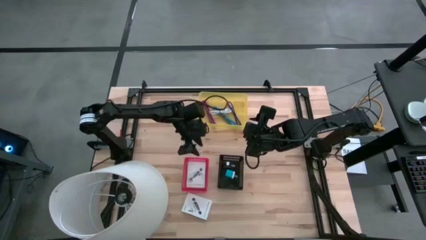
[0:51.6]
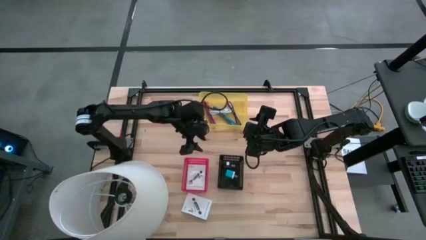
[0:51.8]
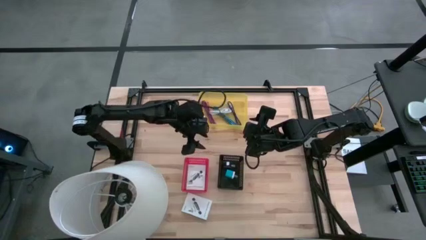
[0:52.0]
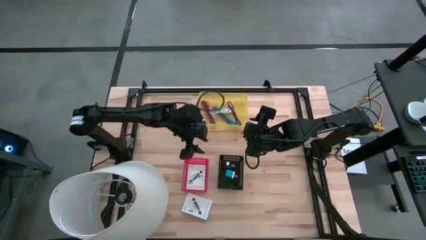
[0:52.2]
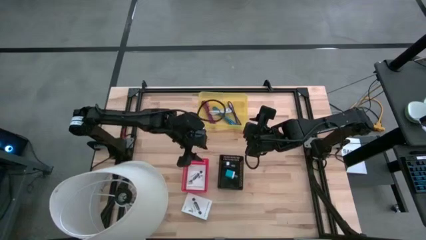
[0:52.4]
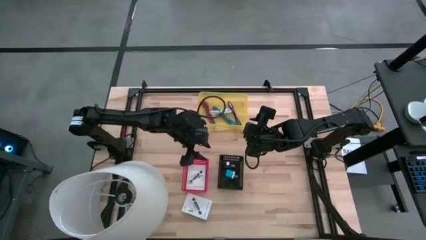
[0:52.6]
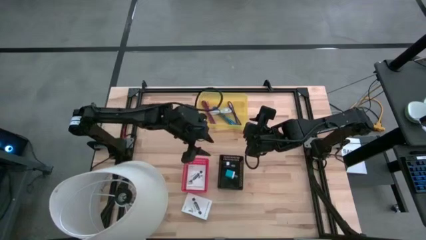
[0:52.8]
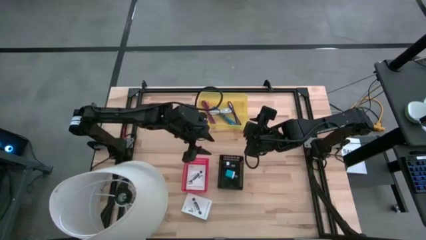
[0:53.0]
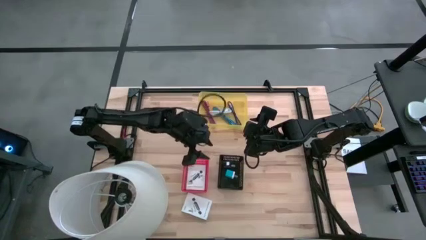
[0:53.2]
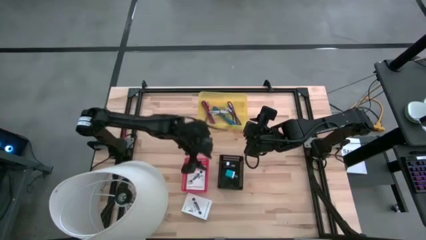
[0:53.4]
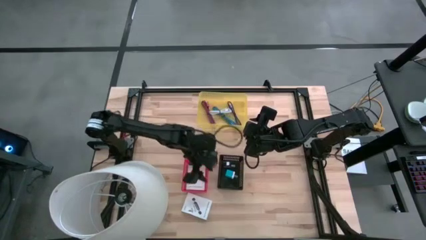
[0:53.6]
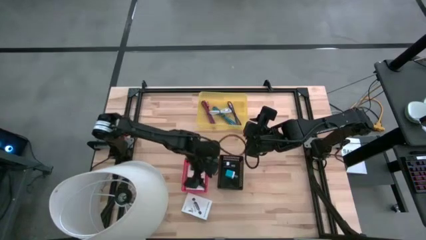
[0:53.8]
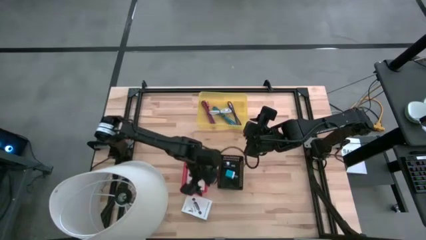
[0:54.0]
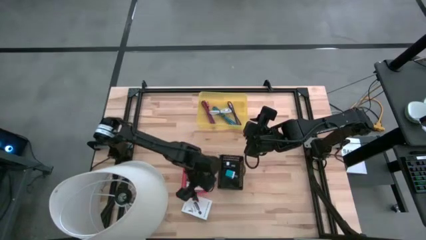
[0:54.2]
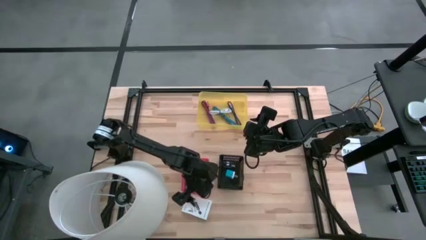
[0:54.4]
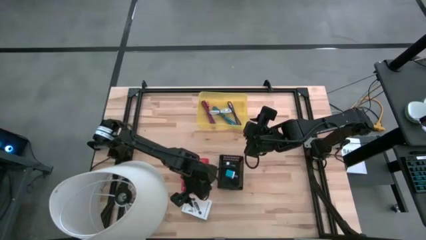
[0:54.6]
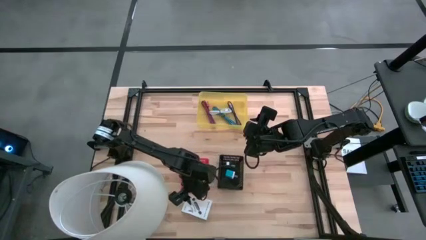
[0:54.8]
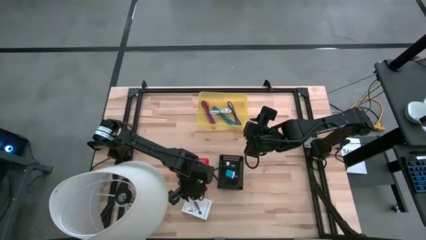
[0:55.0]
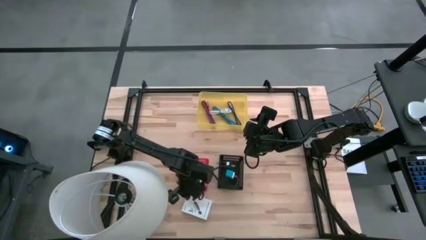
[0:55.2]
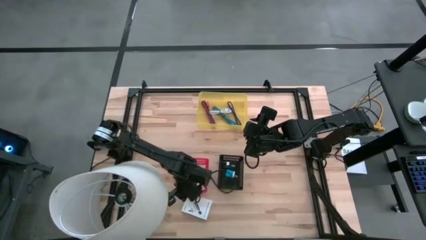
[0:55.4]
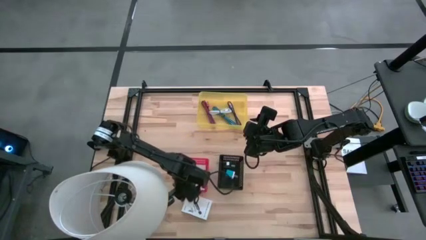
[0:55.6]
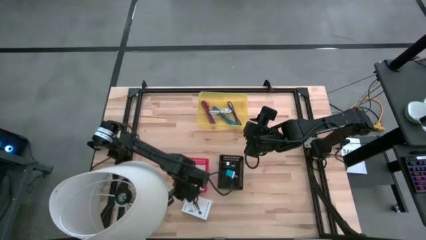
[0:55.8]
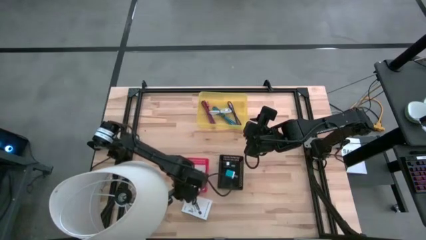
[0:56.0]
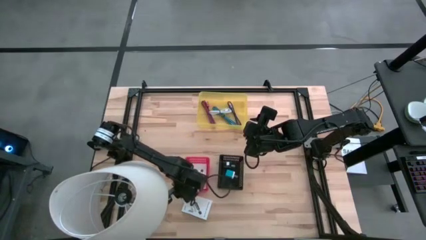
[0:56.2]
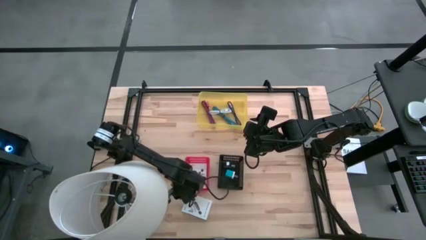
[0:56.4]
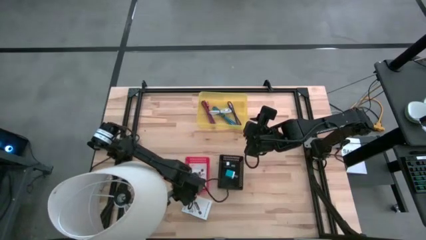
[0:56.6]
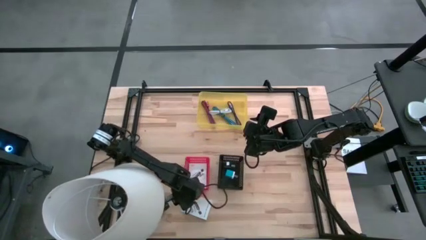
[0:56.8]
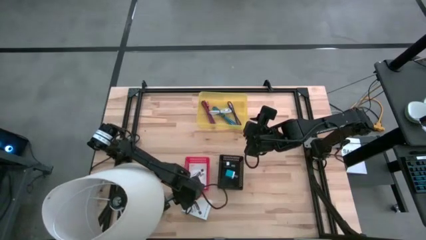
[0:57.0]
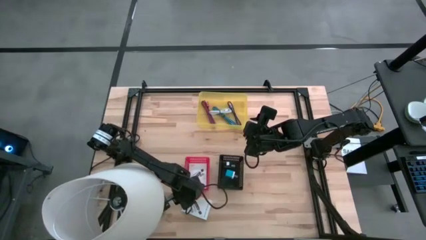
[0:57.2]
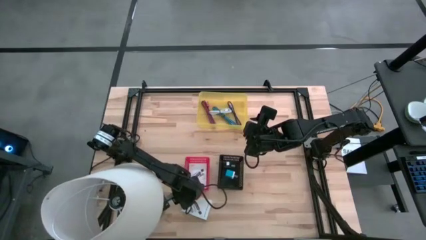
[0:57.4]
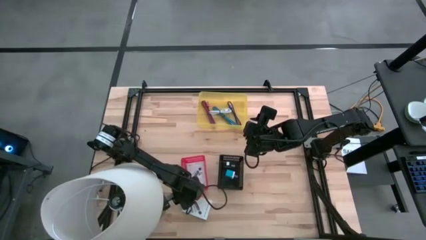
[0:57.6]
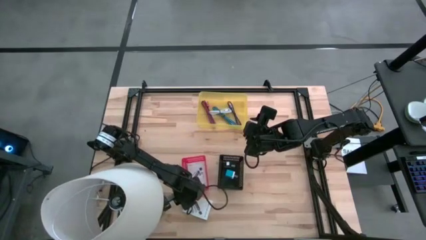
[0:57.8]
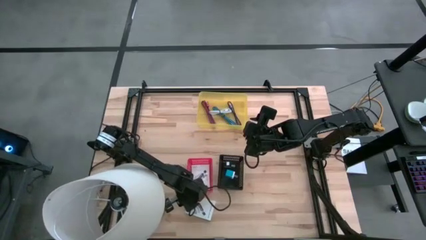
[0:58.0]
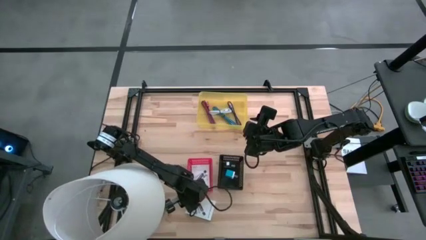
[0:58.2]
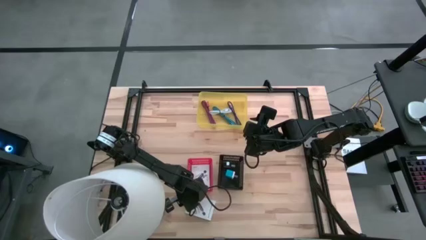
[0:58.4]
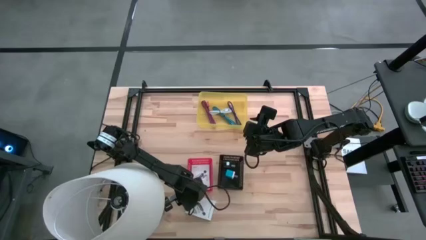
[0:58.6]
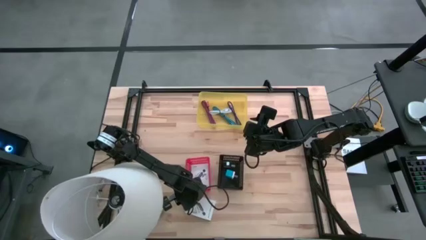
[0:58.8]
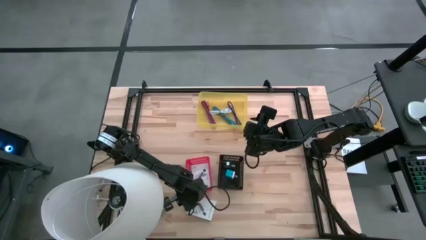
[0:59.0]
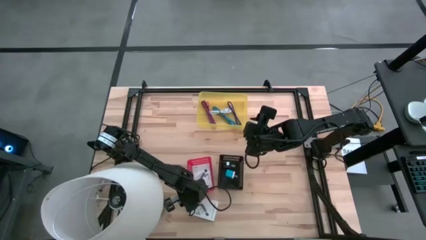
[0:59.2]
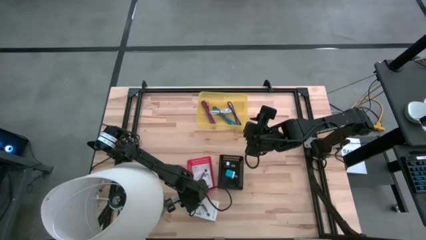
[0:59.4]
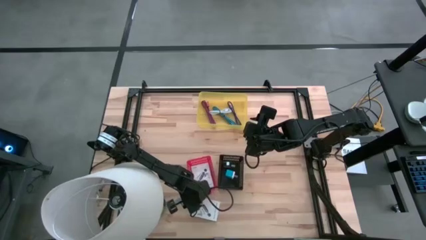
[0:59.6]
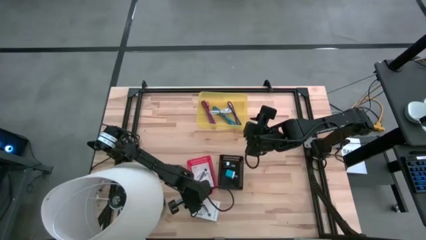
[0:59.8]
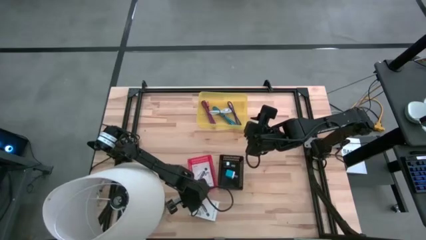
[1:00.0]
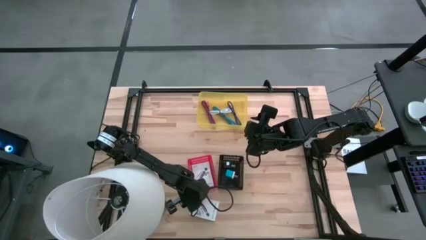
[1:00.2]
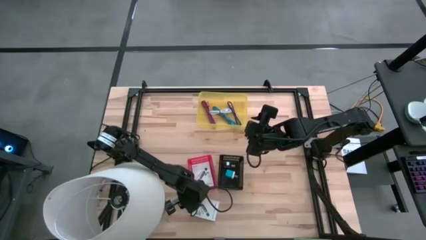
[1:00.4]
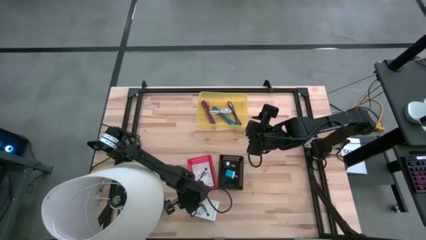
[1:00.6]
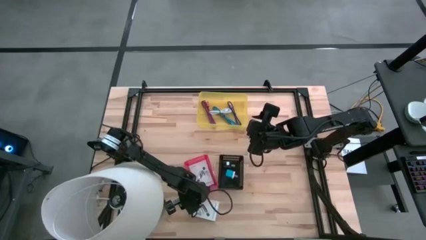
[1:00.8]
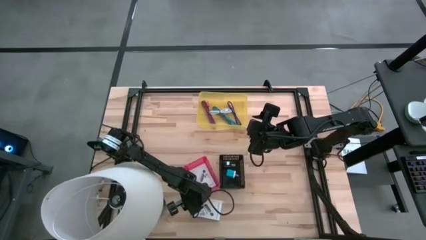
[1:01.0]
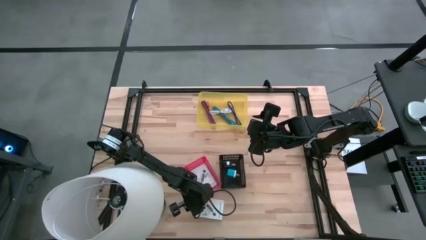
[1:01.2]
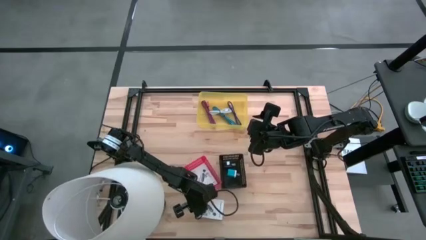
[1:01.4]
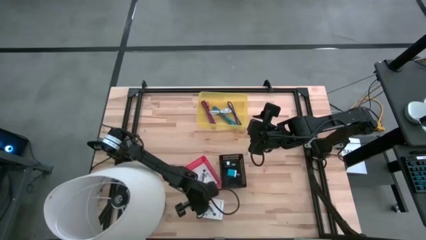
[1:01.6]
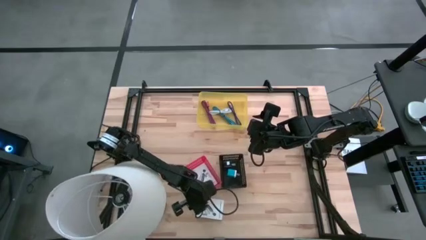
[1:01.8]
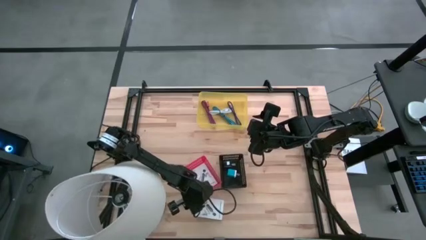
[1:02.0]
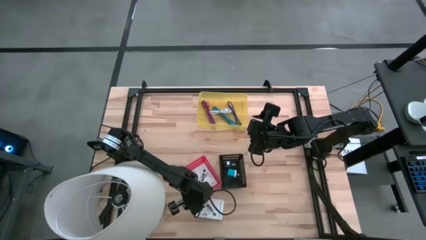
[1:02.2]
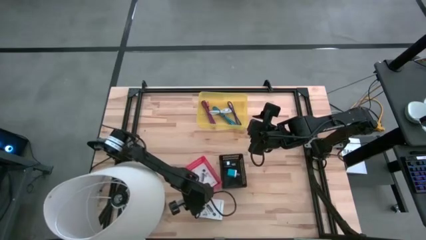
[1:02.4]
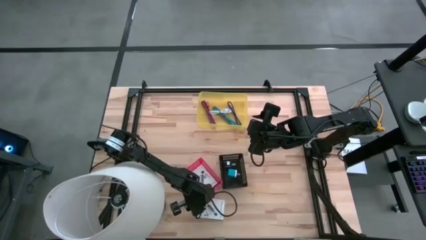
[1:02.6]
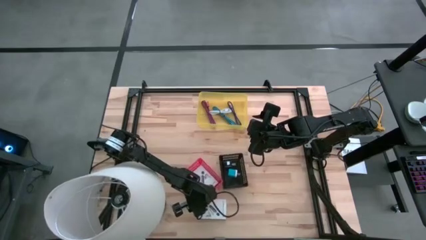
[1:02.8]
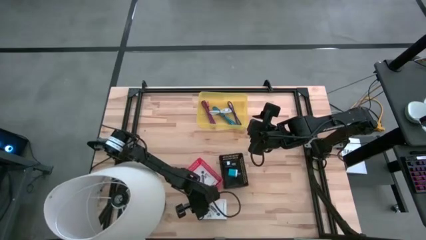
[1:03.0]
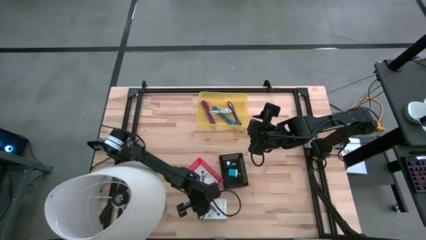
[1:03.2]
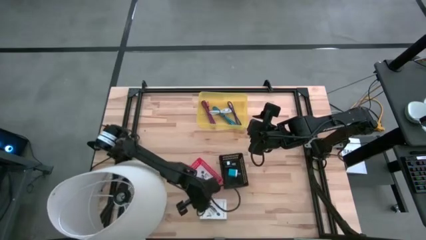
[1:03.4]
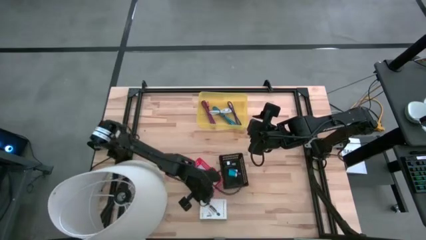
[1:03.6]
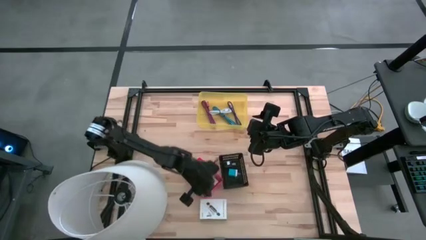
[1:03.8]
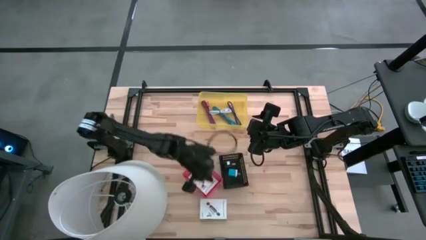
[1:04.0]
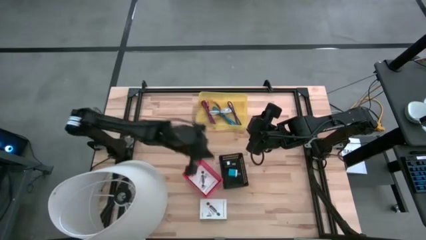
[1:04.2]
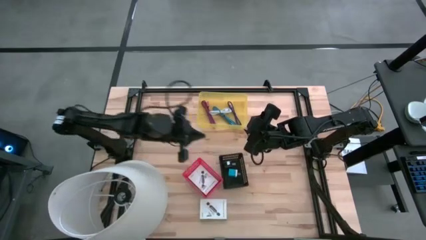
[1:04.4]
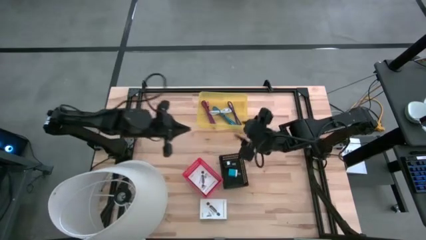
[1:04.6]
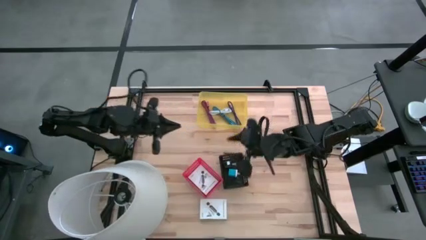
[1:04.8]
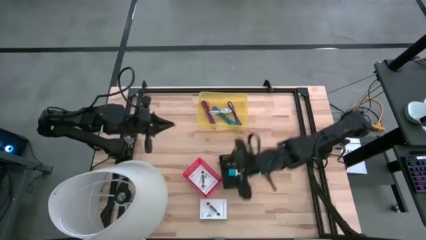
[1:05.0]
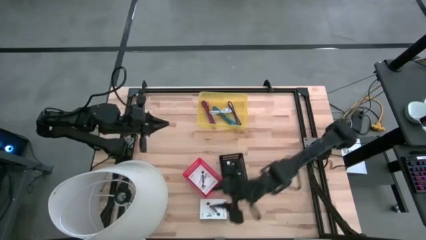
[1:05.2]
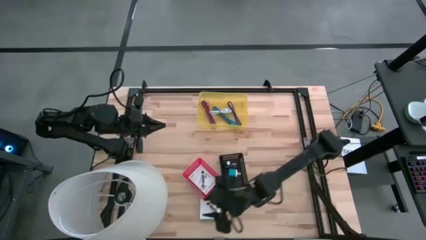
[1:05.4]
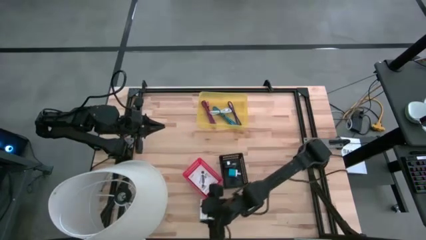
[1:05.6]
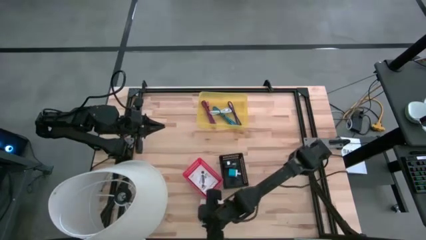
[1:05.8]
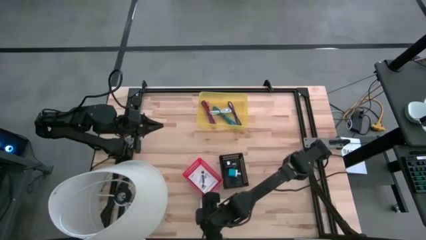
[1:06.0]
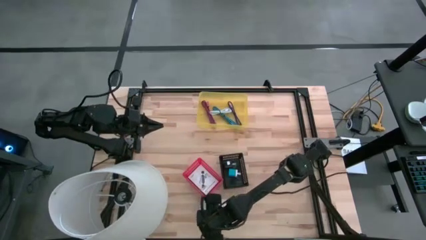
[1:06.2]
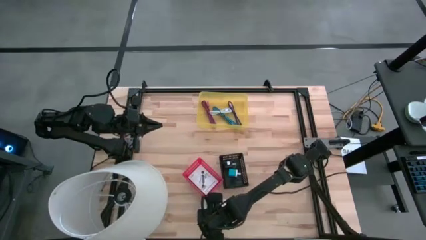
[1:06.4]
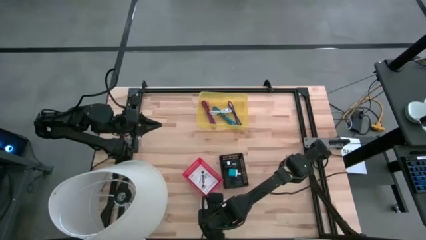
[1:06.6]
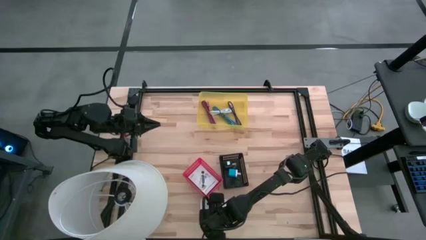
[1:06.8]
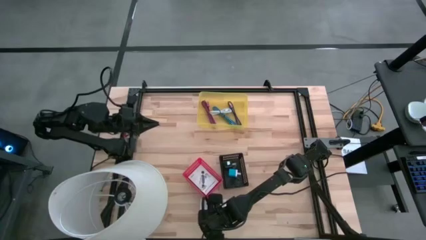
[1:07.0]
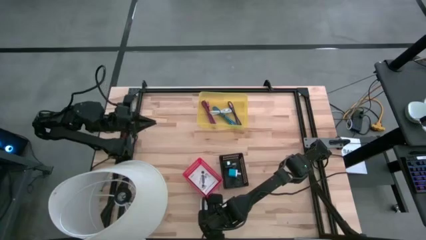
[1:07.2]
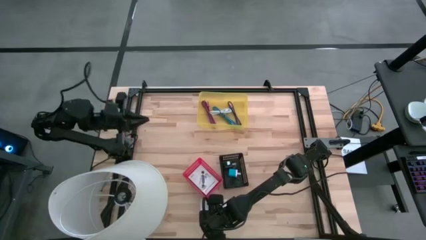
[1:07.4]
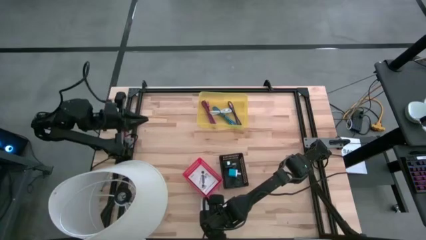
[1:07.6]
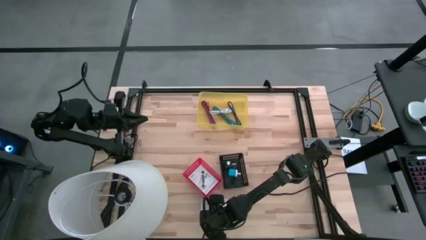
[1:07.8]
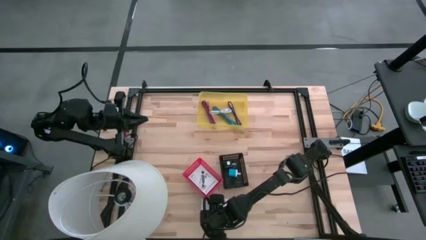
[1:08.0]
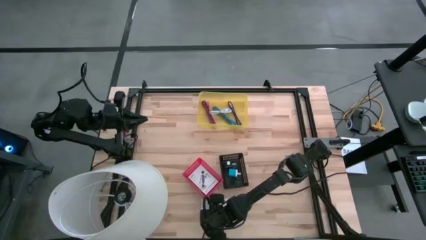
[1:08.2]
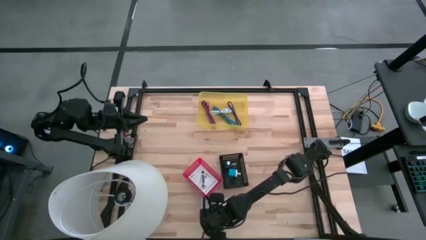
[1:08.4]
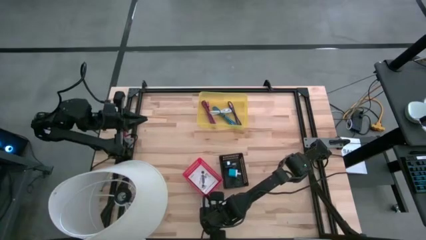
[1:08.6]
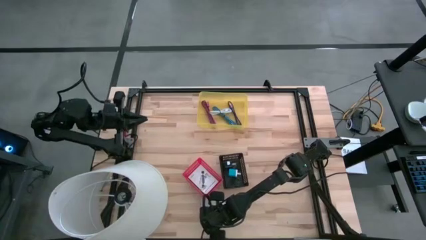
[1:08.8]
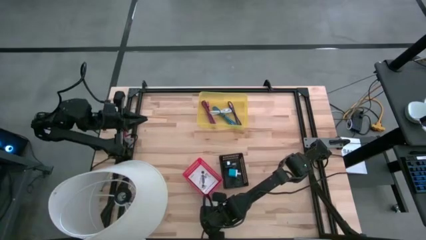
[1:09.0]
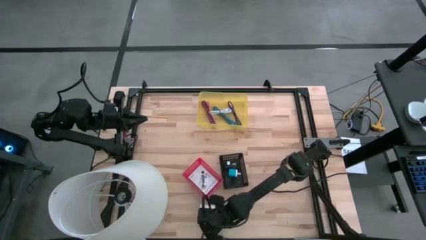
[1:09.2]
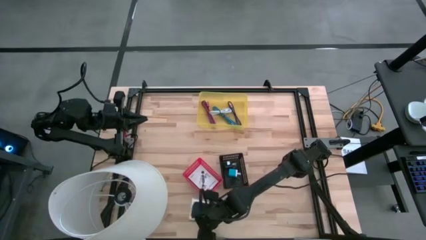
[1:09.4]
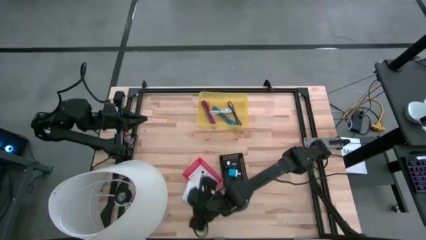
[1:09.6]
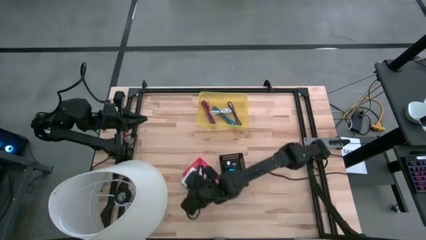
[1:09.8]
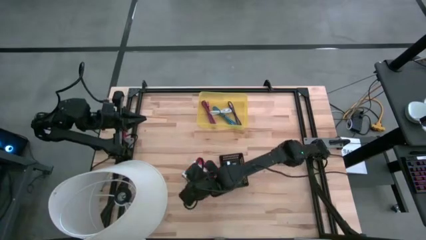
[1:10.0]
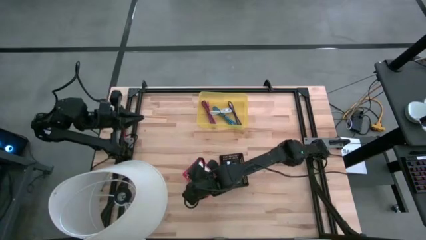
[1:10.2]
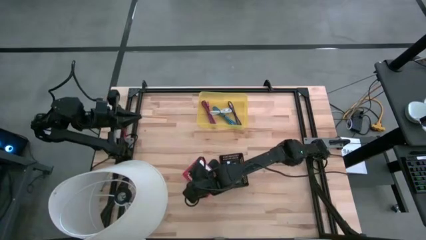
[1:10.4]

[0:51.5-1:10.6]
Task: Pick and place items into bin
Put the card reader box into the red bin
